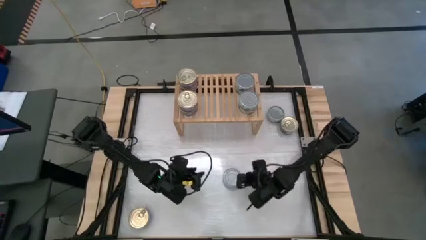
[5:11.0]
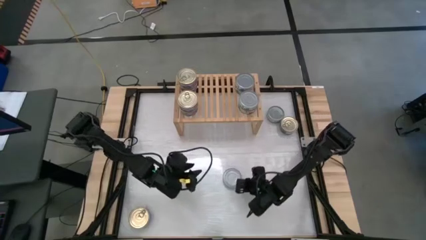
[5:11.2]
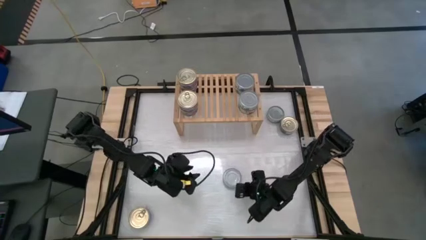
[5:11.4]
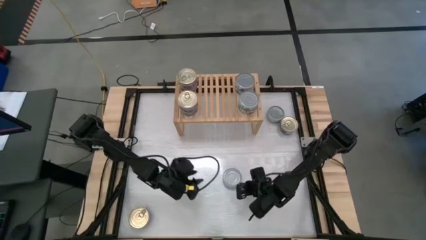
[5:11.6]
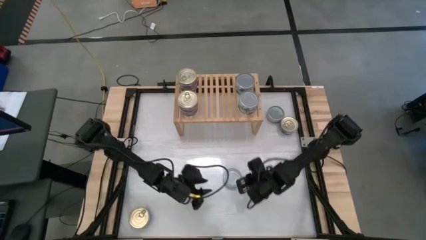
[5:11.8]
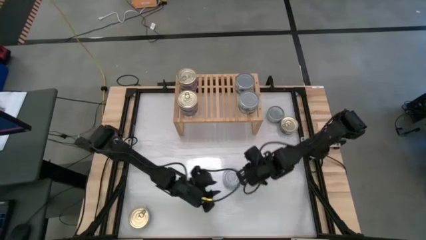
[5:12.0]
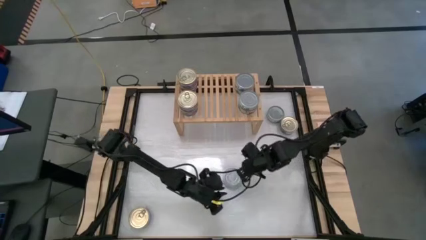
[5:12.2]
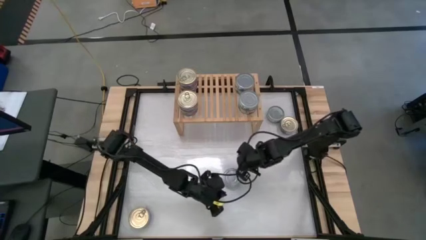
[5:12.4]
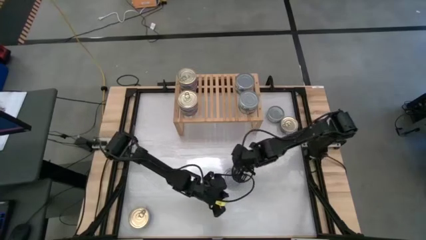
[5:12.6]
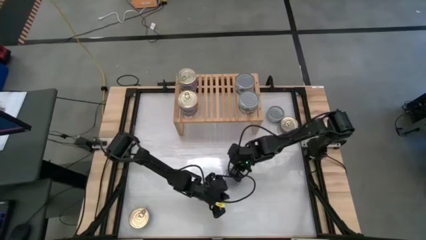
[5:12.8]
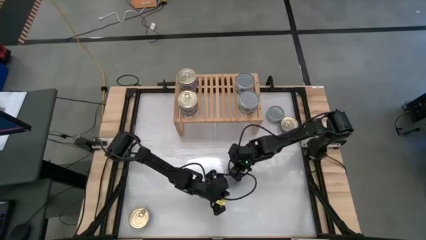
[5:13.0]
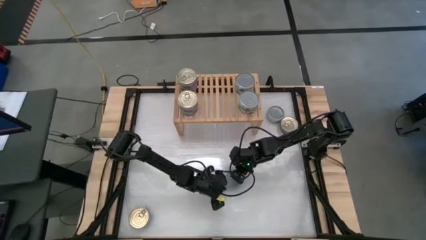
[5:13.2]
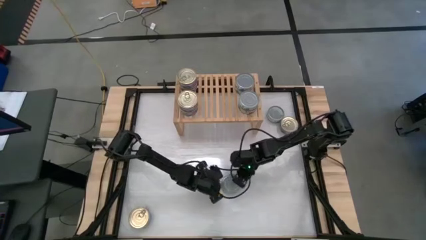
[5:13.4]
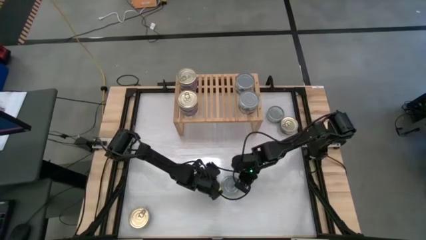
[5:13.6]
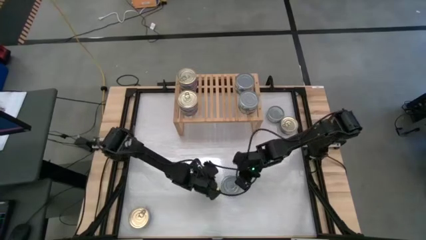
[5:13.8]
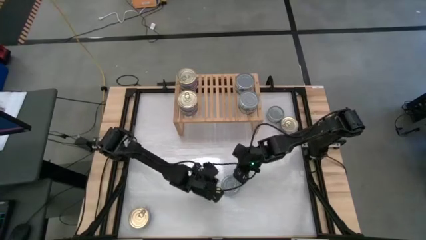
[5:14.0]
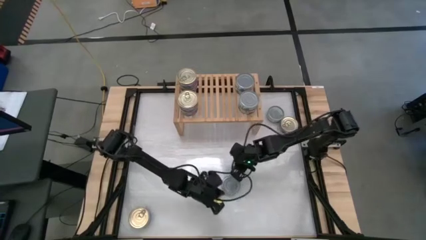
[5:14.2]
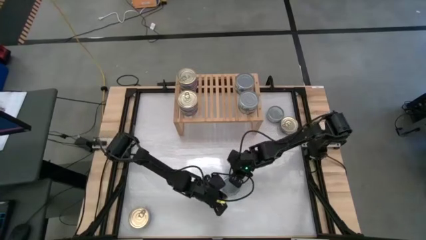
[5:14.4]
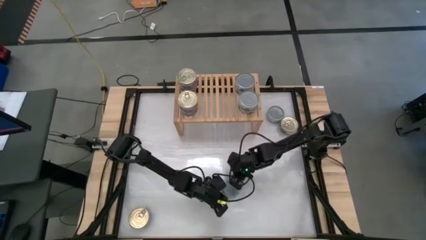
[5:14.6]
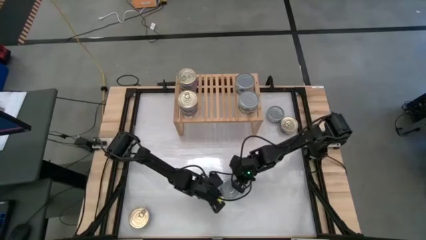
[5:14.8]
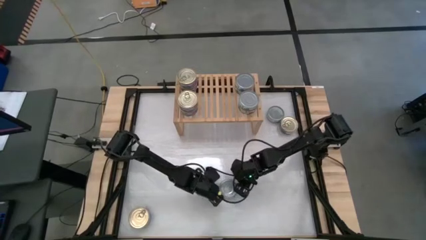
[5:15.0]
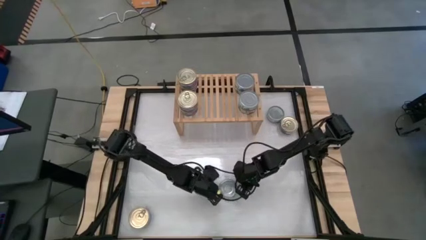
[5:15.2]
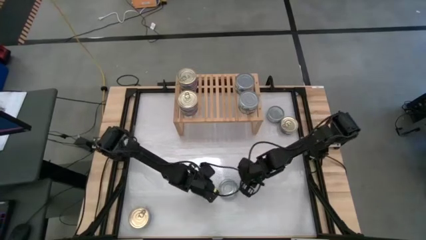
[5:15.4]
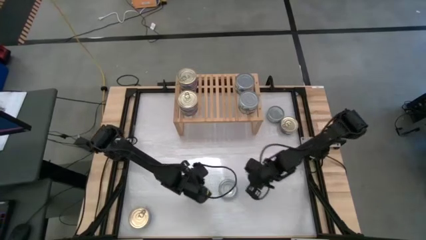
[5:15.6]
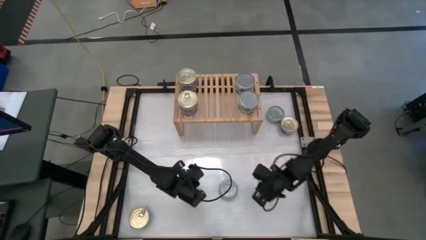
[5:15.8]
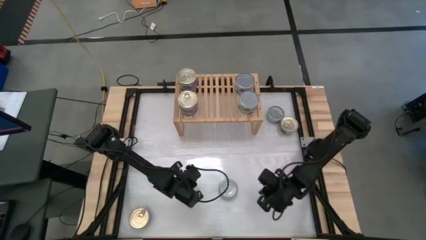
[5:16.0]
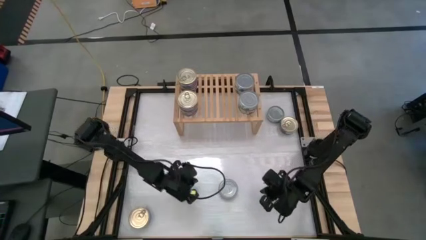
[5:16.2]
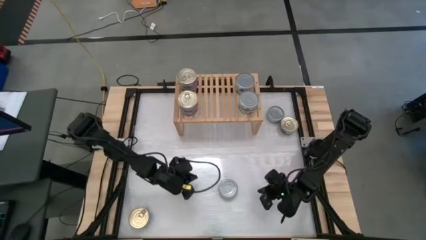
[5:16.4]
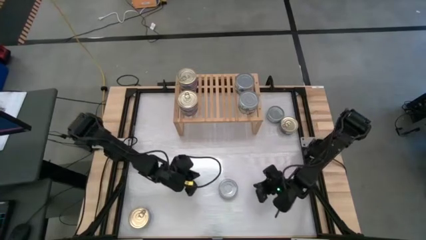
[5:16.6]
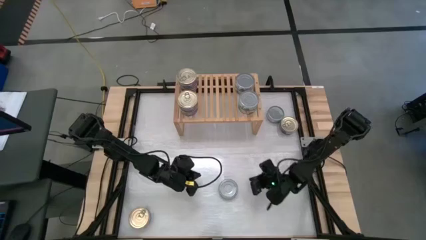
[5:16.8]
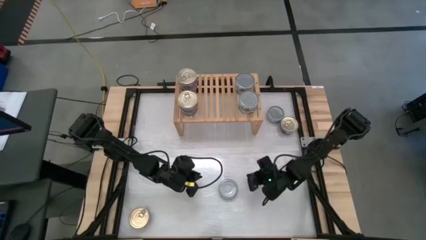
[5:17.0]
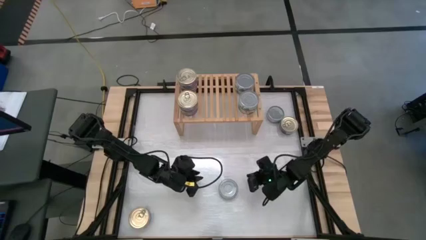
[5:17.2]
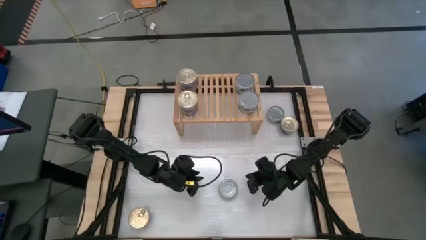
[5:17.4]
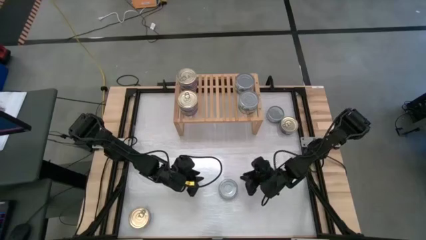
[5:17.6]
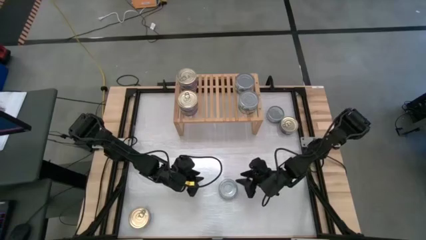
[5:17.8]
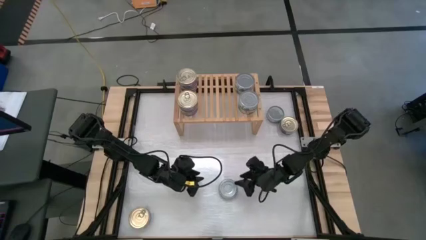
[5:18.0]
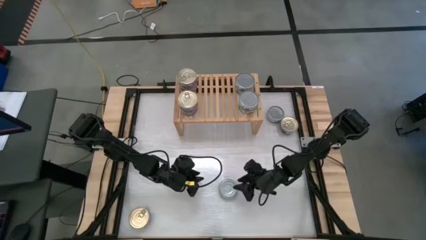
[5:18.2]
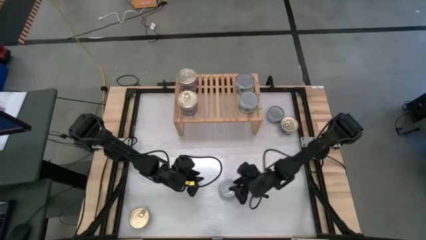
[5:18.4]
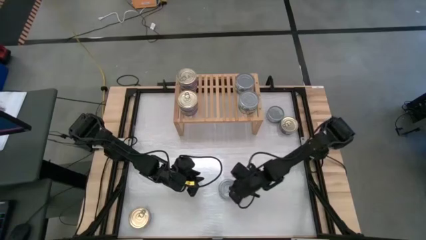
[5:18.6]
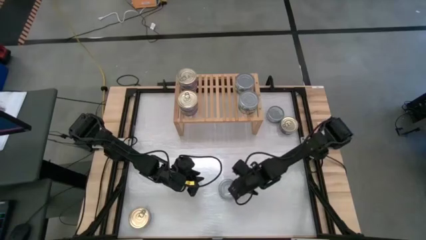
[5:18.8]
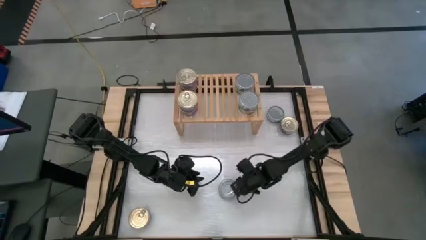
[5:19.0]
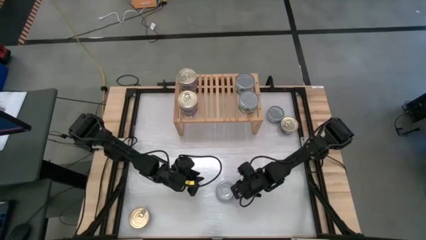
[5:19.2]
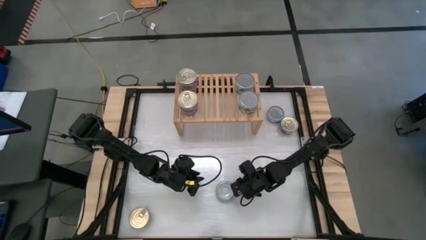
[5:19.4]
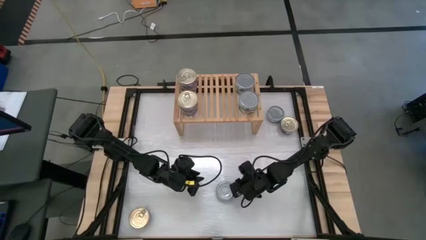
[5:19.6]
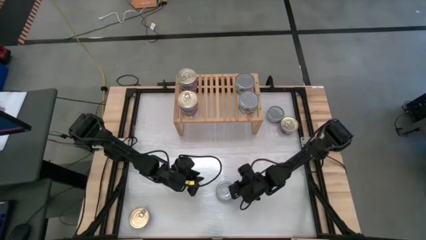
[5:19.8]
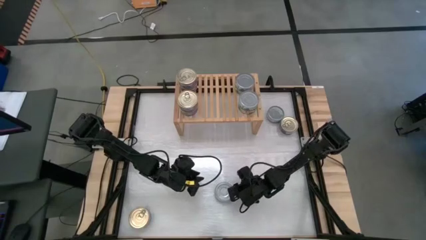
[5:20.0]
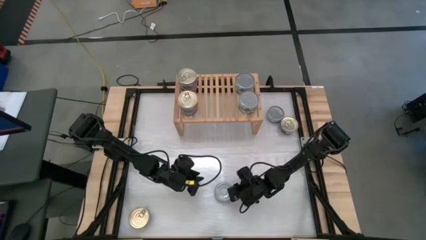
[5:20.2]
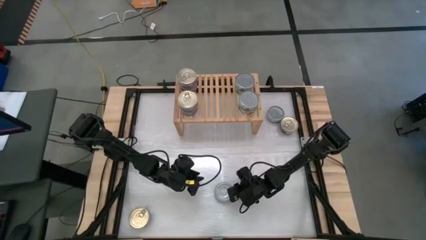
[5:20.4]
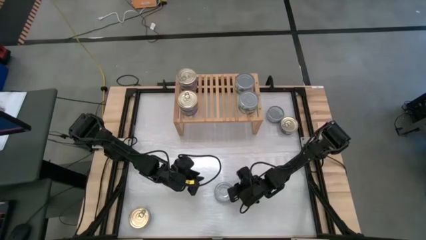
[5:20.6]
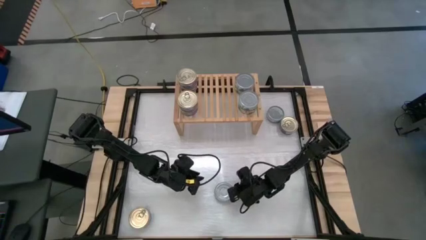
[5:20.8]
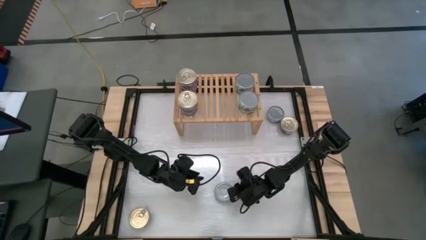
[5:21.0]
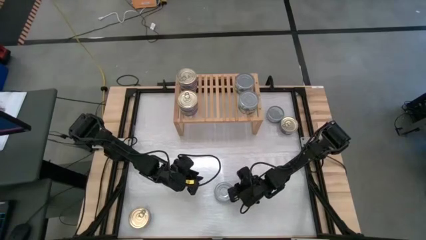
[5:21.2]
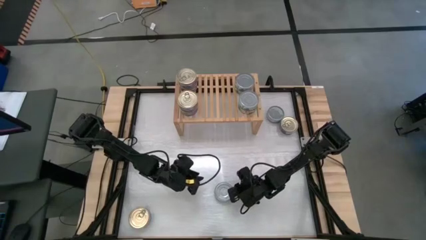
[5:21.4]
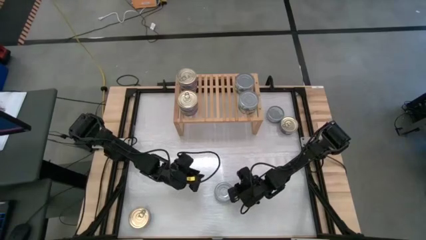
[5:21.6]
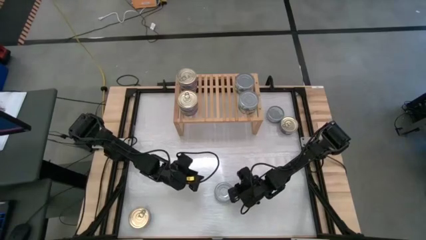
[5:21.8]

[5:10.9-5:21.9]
Task: Stack canned seafood by type on shelf
Put the green tuna can on the shelf aligned with the other green tuna cans
